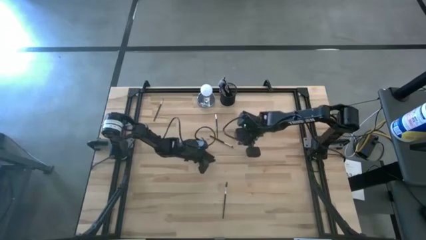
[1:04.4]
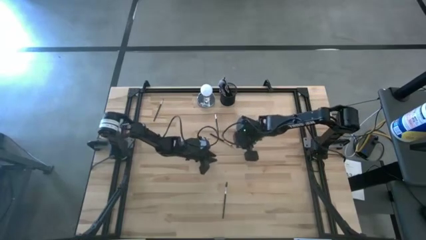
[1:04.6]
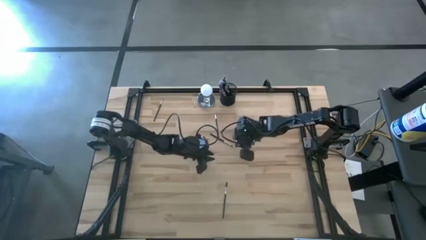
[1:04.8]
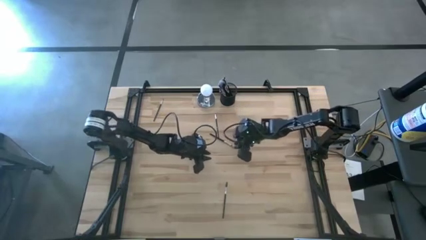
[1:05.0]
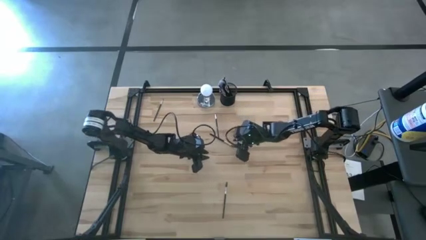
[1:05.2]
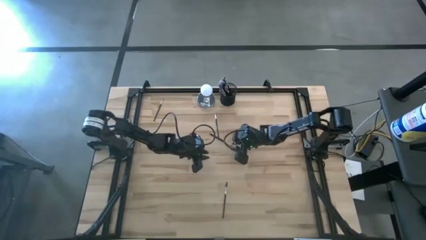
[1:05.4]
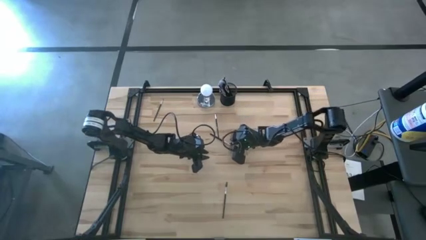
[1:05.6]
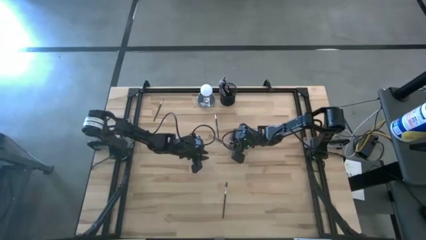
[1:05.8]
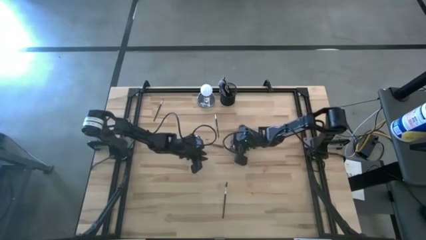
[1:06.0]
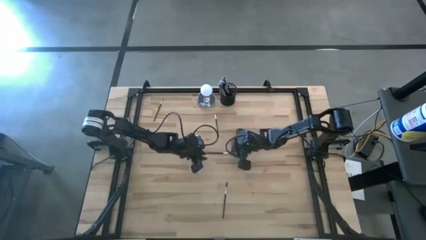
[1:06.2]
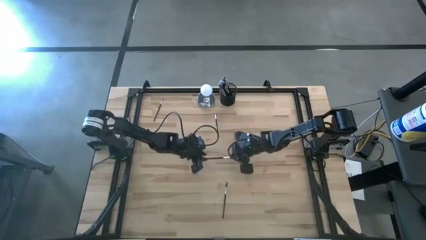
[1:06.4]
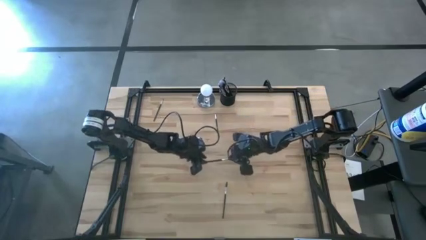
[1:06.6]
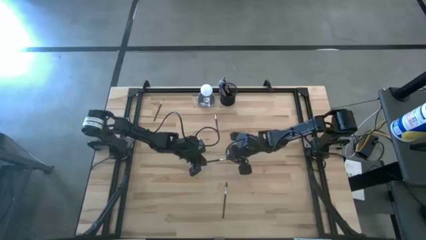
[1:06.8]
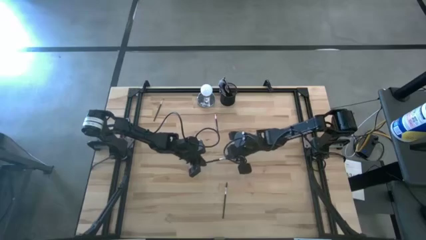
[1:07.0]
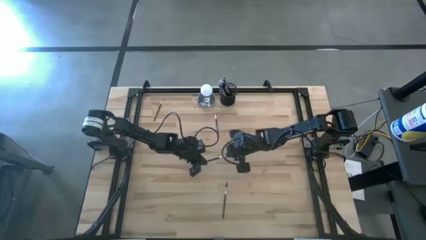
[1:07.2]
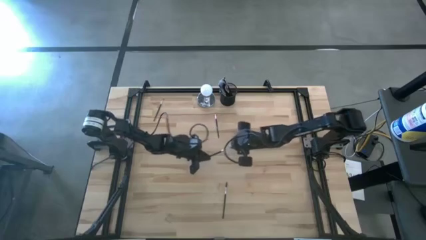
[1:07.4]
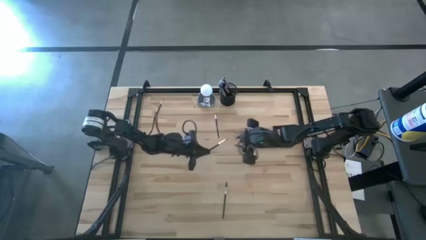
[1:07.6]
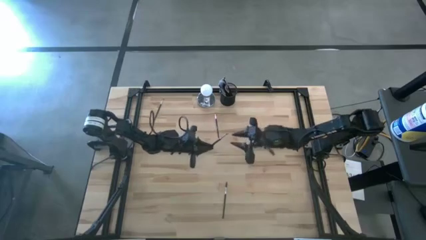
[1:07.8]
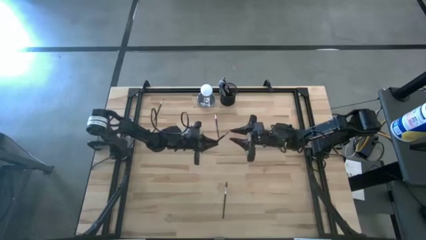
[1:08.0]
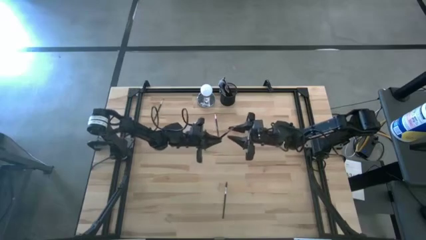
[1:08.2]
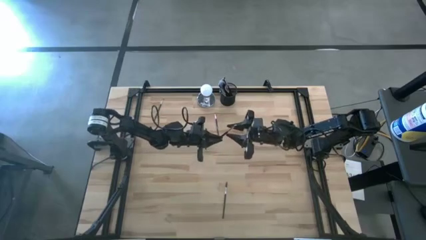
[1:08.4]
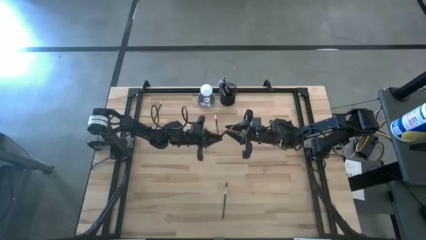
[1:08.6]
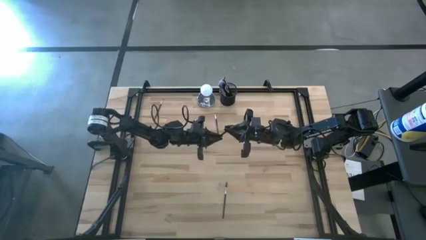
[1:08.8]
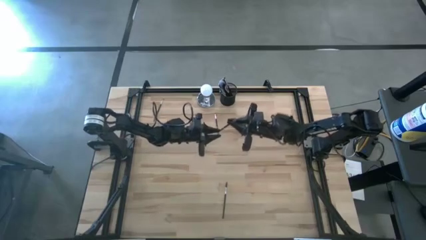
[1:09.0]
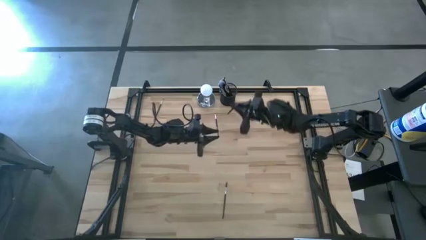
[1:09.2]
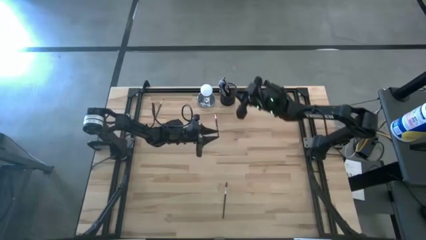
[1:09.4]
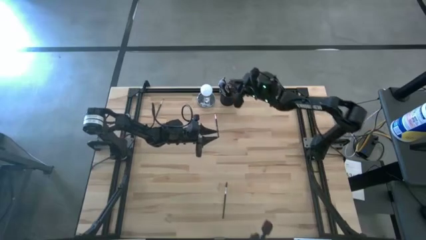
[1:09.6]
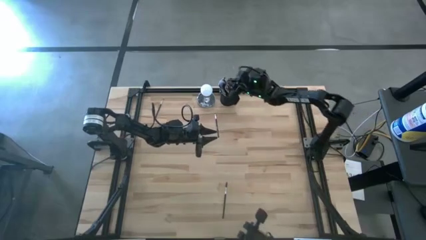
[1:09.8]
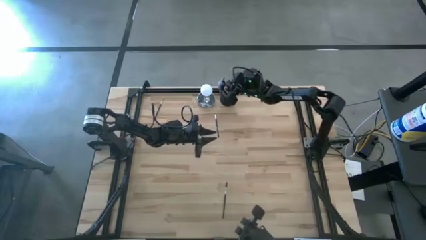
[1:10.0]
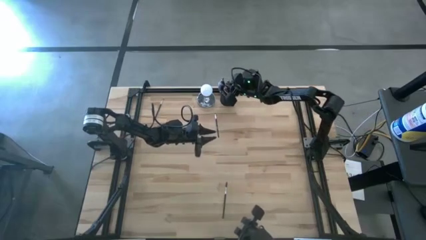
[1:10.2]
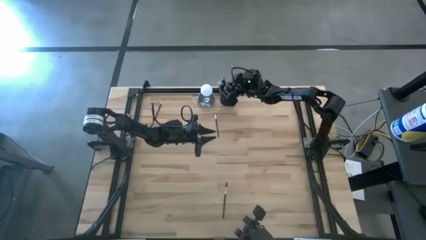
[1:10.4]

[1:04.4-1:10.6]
Task: Pick & Place Makeup Supplies
Put the makeup brush into the black makeup holder

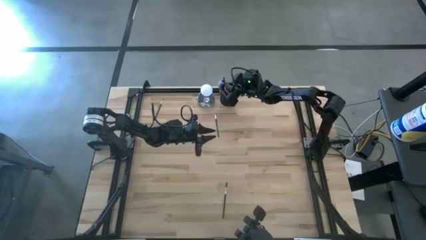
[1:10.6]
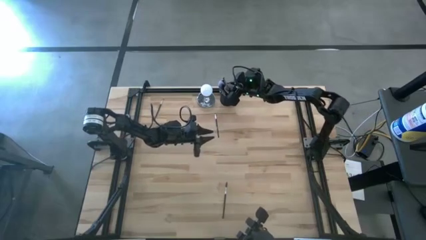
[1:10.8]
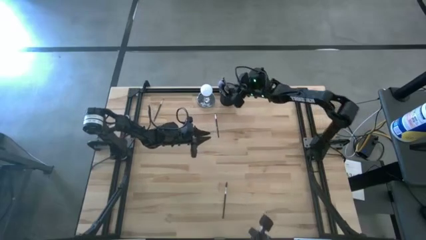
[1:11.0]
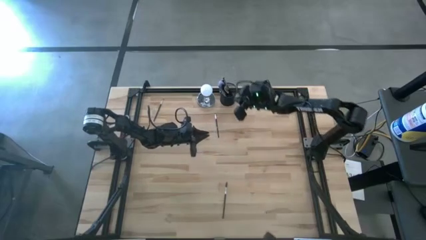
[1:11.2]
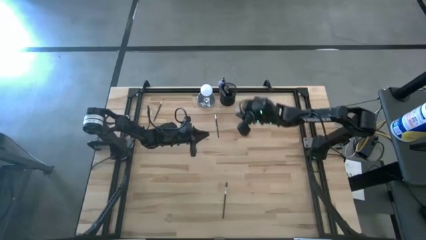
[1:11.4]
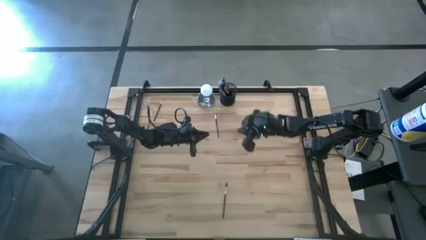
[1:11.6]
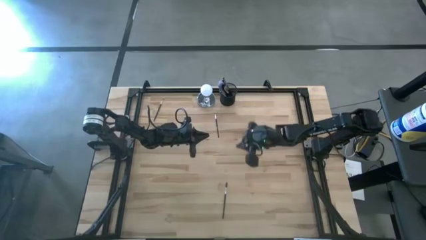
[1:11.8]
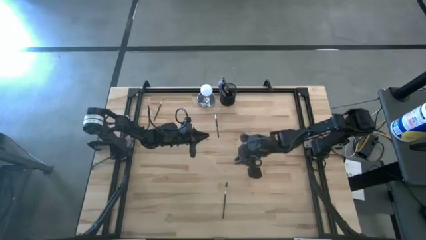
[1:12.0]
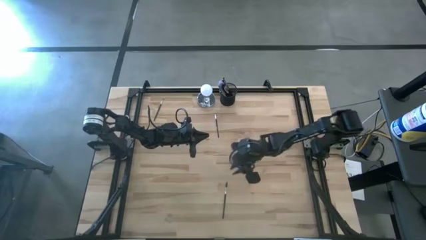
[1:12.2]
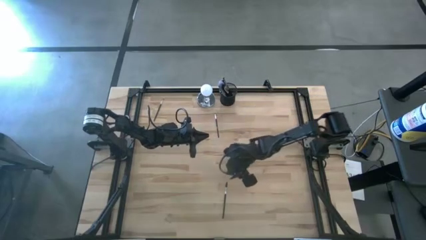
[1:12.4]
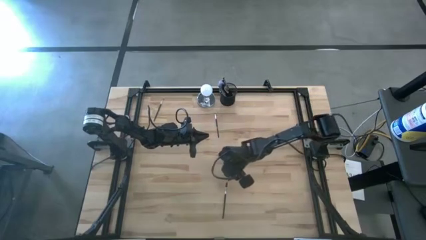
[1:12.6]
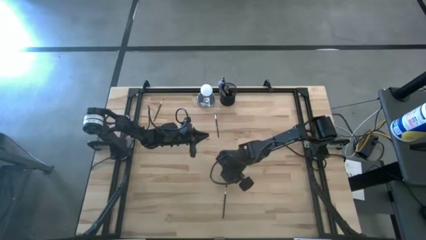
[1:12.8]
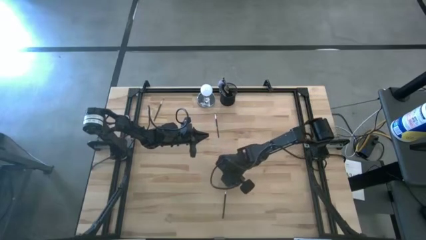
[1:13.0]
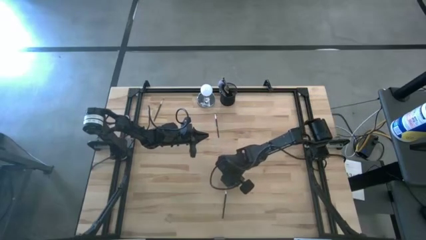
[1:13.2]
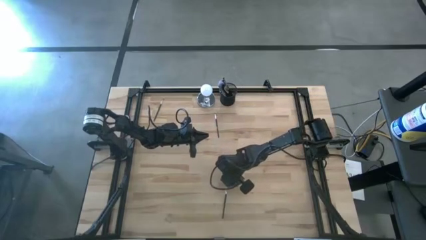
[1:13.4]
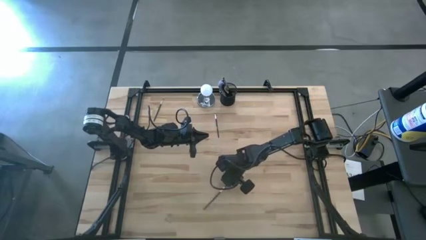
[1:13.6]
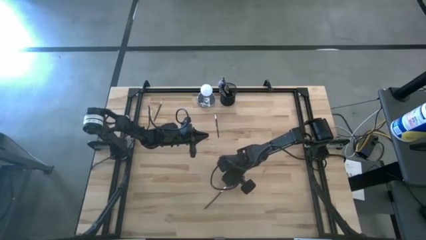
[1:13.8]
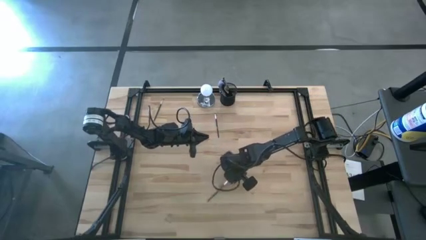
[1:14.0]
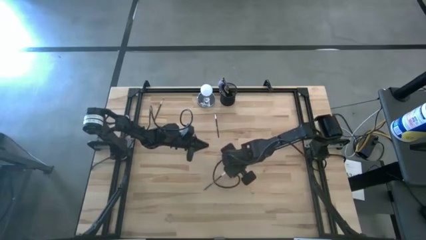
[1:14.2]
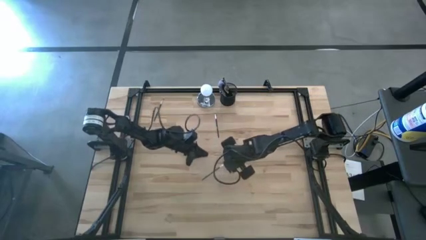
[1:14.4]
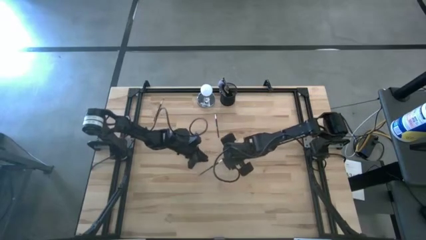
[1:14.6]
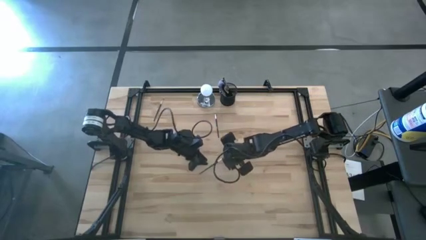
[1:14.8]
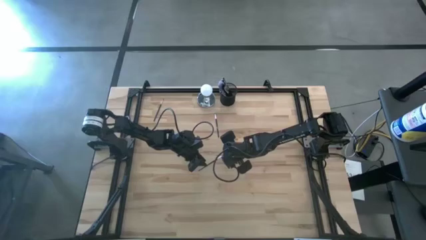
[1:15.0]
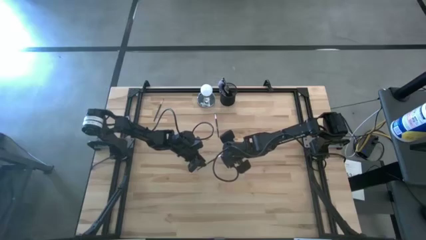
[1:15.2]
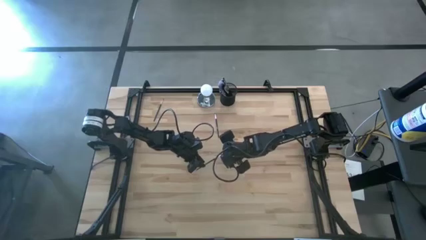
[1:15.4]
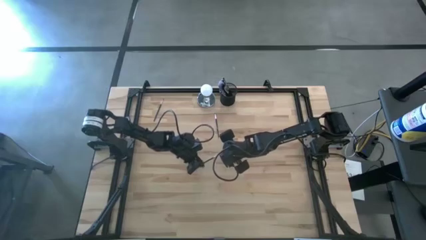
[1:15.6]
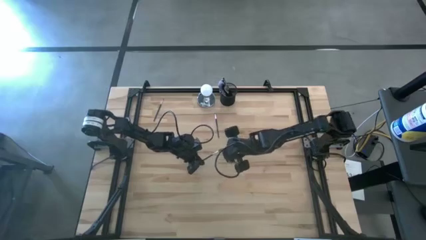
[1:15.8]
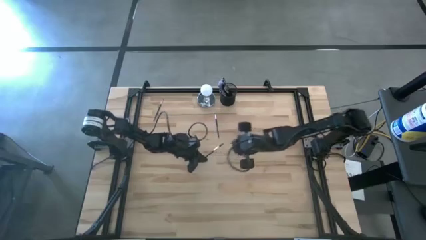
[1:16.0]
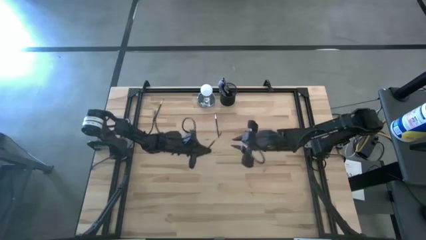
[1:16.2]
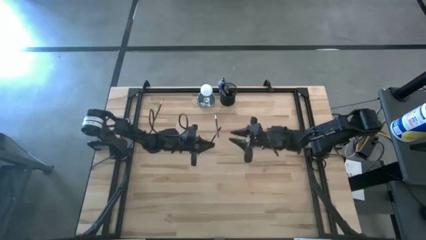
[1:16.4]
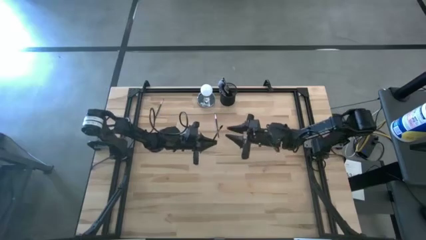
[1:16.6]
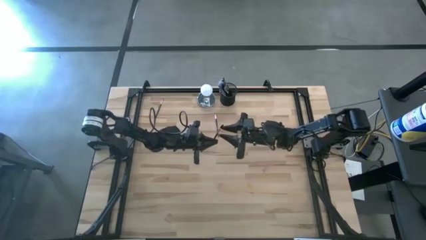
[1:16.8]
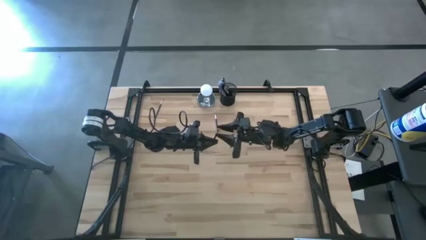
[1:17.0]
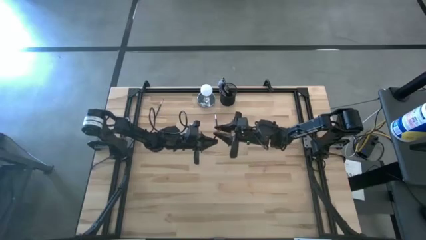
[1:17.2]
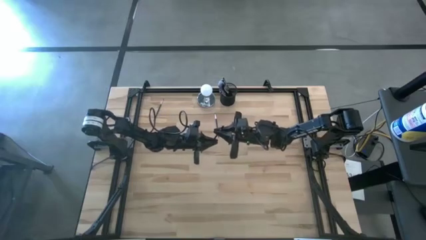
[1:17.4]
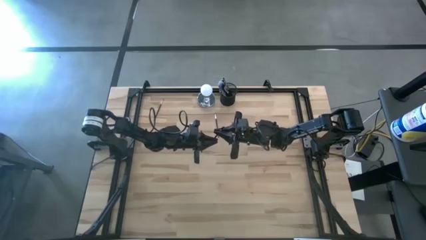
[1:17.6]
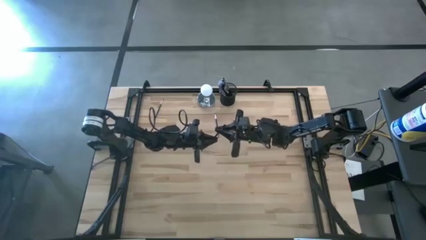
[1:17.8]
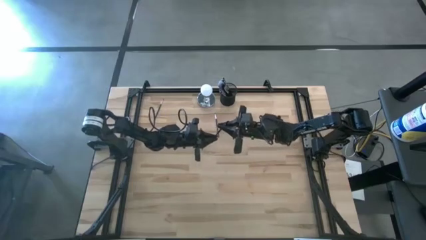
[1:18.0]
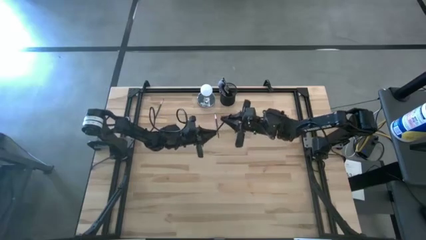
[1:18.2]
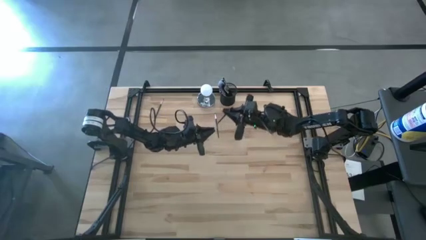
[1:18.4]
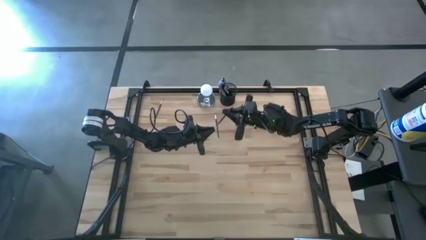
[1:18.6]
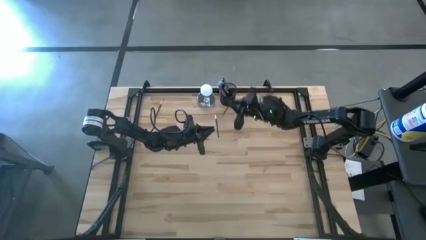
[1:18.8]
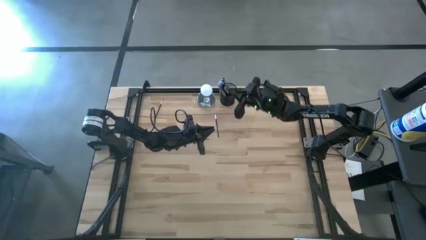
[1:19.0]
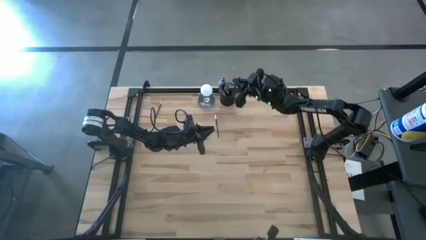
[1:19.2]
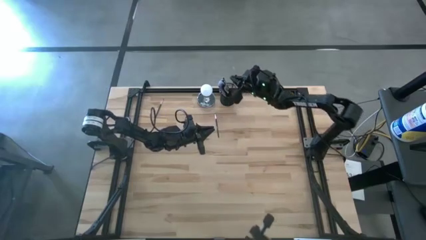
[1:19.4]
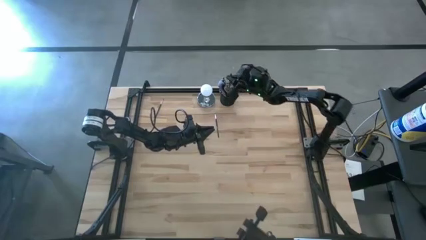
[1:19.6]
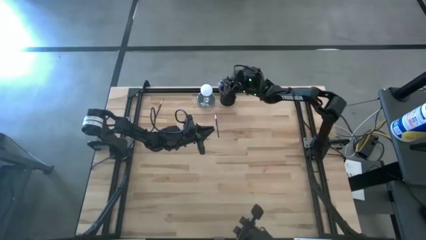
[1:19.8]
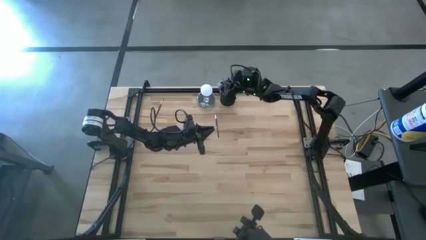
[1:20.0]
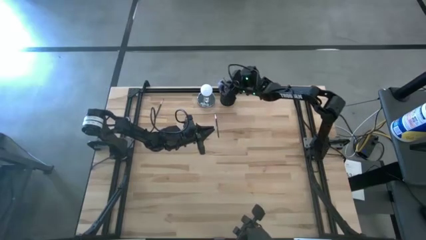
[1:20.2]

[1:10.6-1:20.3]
Put the makeup brush into the black makeup holder

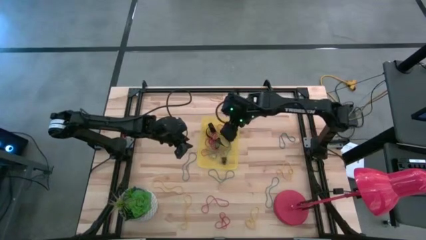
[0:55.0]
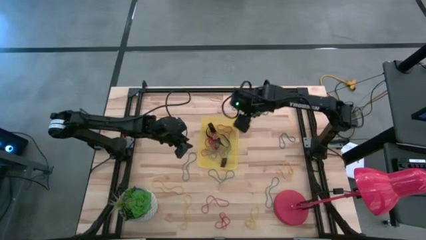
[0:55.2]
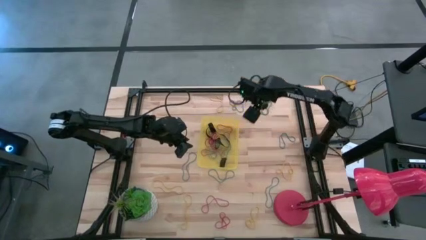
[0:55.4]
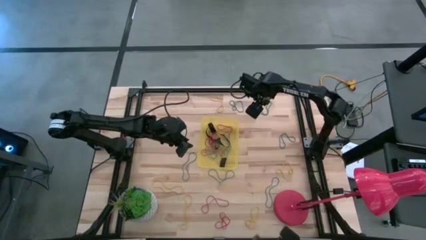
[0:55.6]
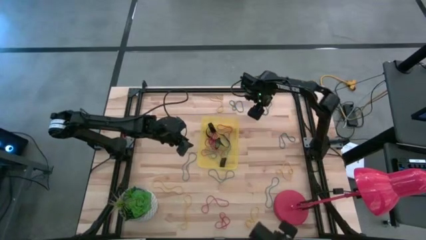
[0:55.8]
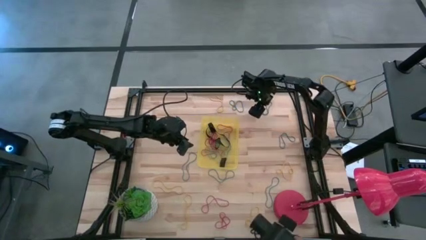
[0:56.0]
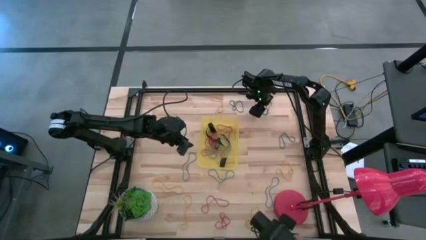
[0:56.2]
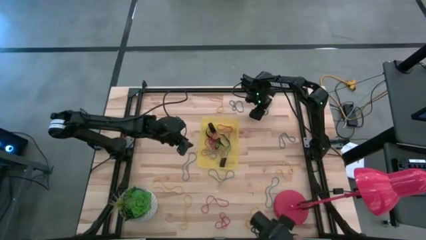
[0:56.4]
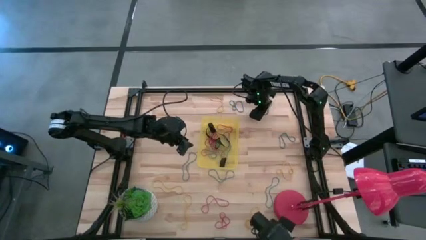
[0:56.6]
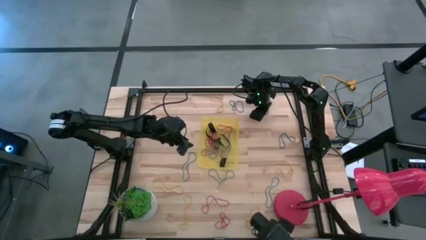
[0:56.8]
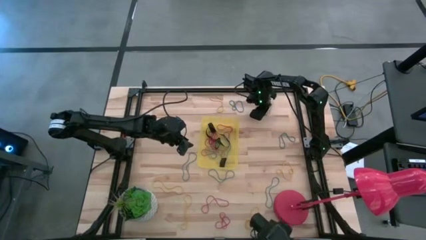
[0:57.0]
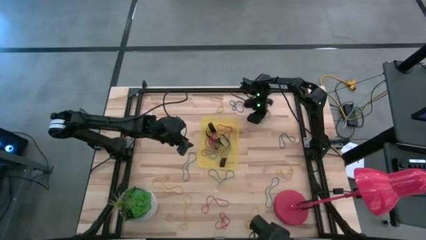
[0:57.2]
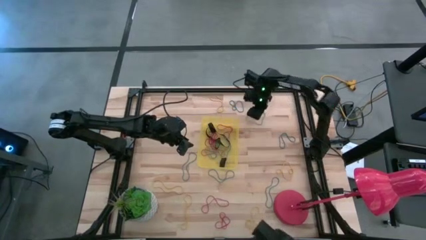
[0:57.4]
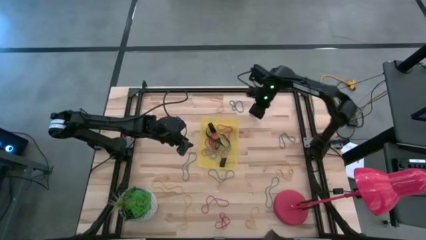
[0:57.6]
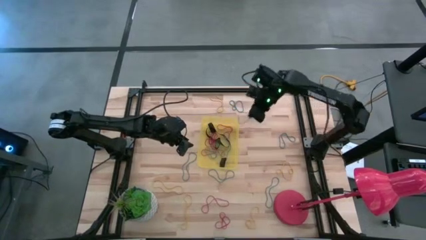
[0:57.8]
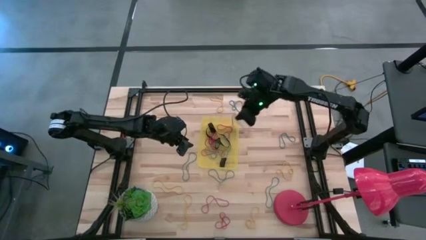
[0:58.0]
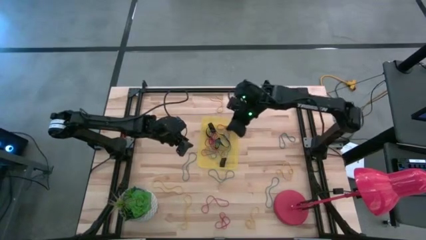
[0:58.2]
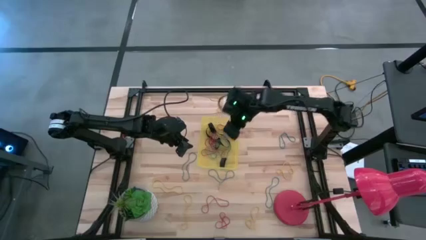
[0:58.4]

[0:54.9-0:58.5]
Task: Pick and place rubber bands into bin
Put the blue rubber band into the yellow bin
